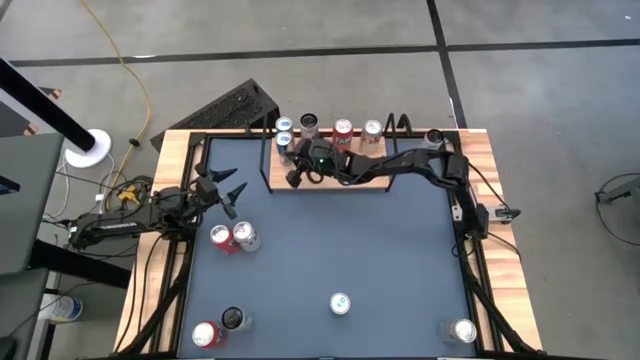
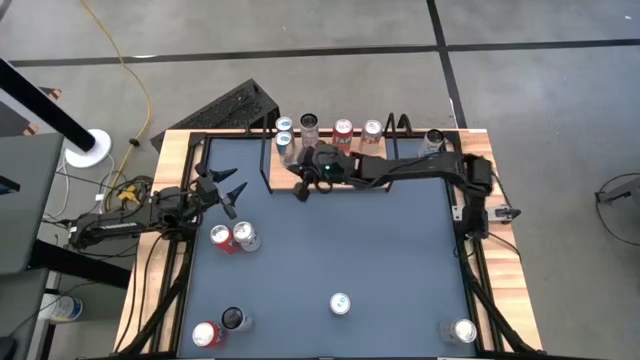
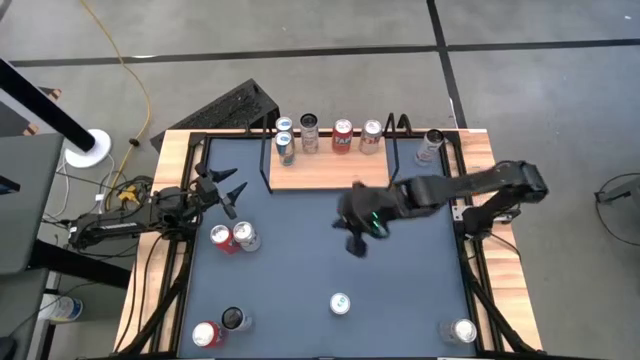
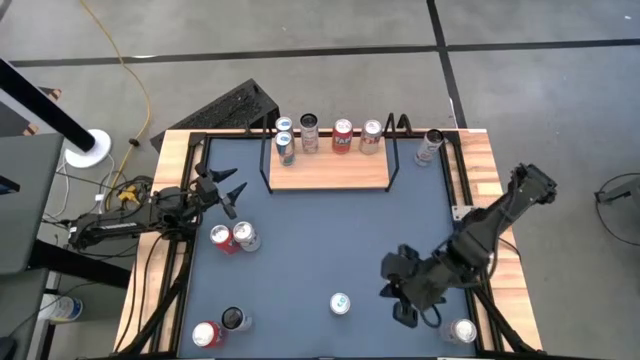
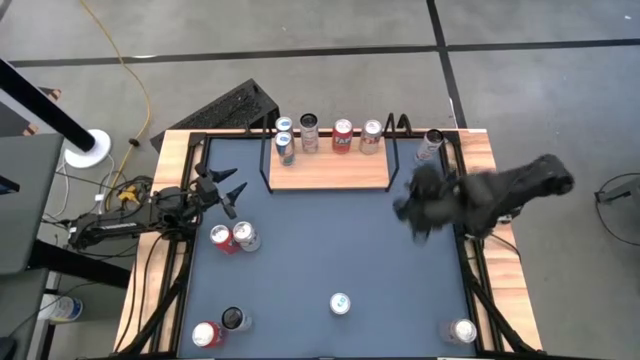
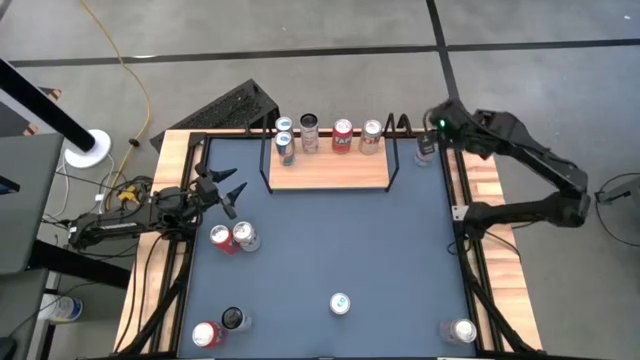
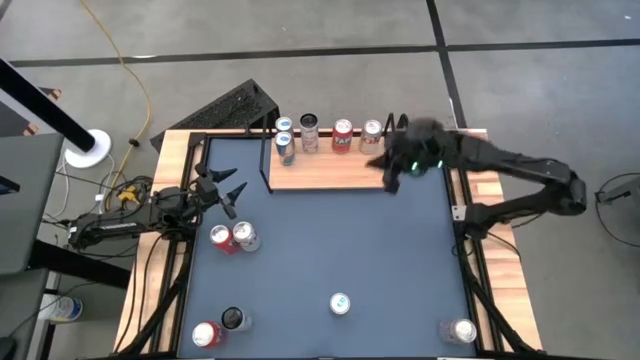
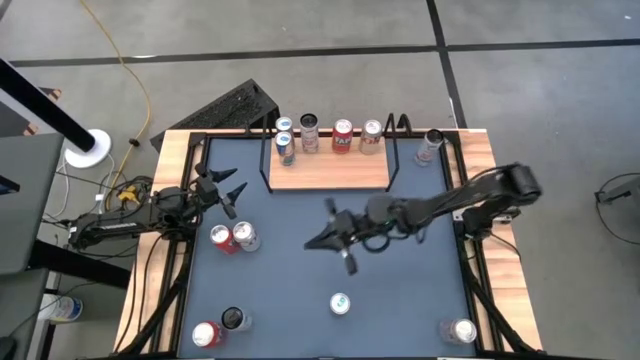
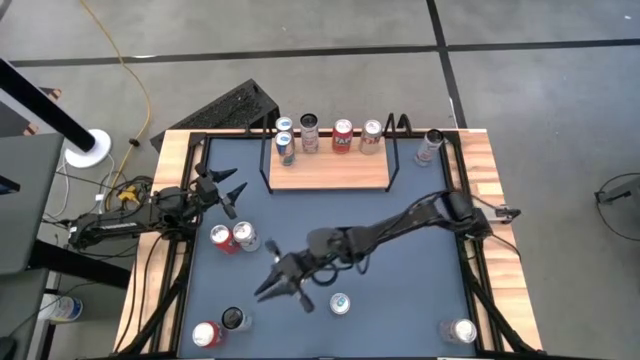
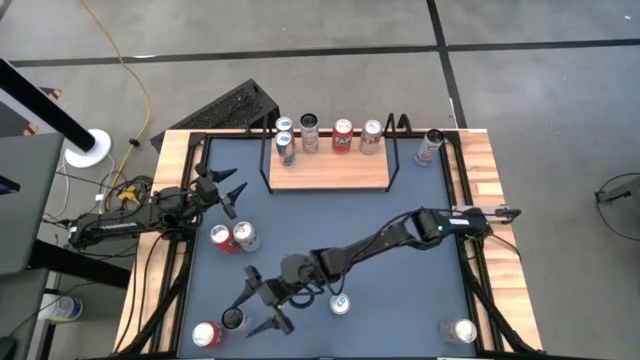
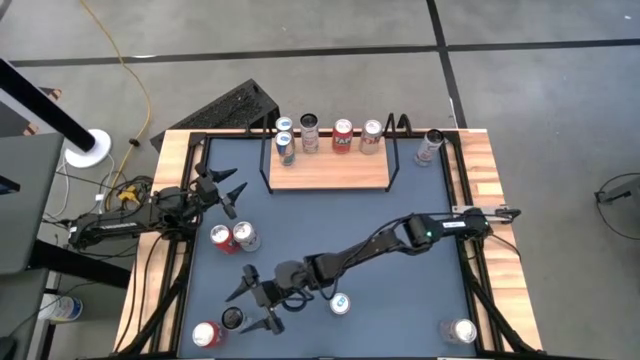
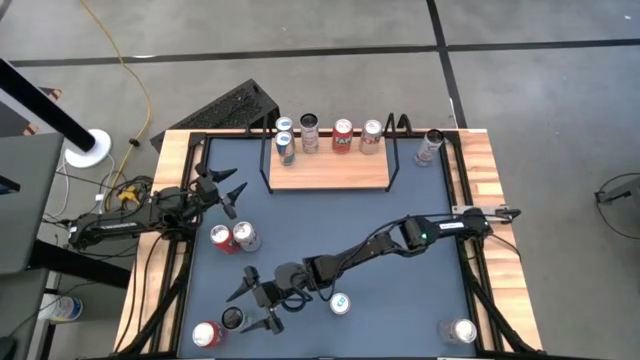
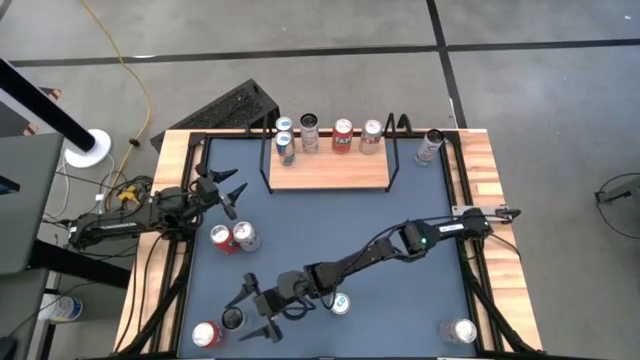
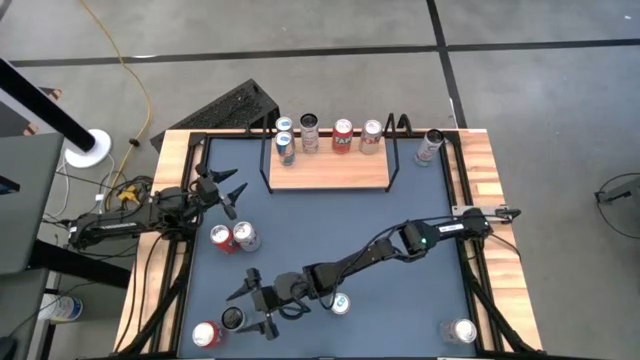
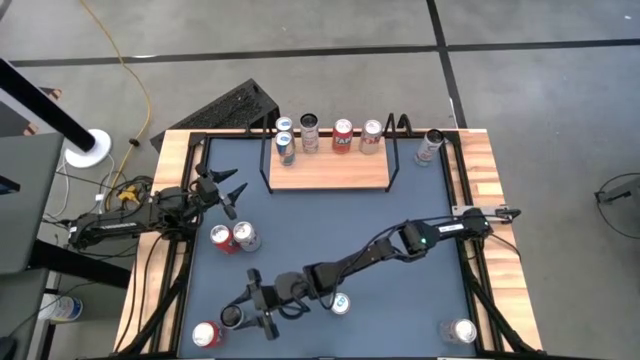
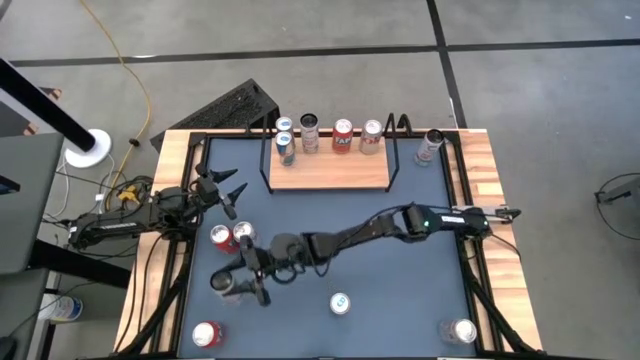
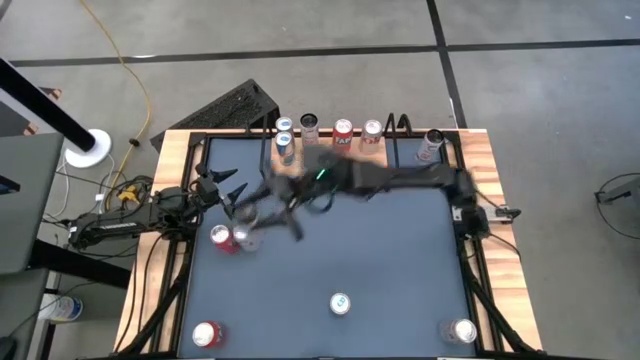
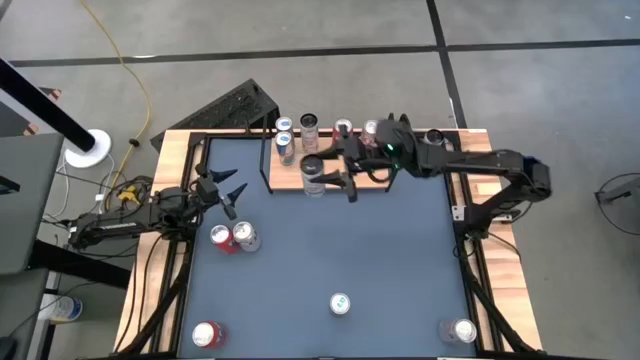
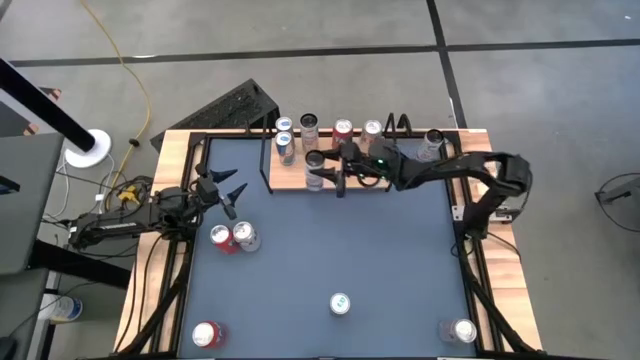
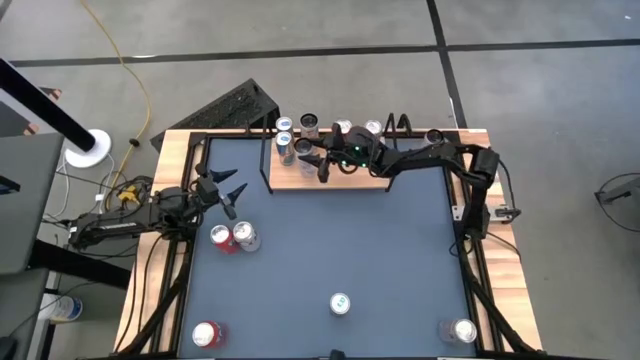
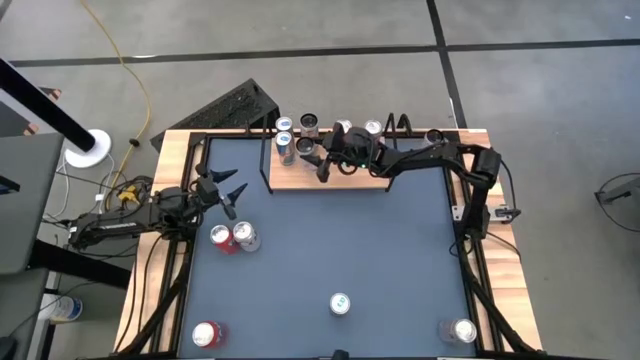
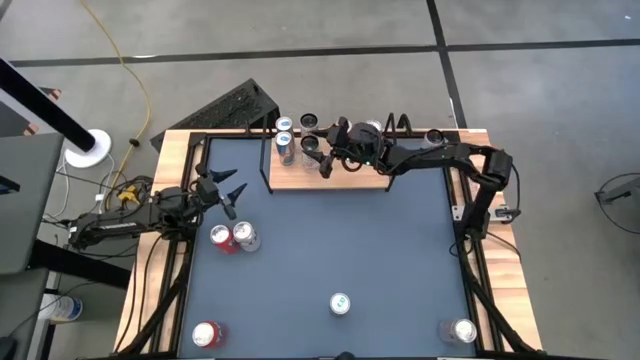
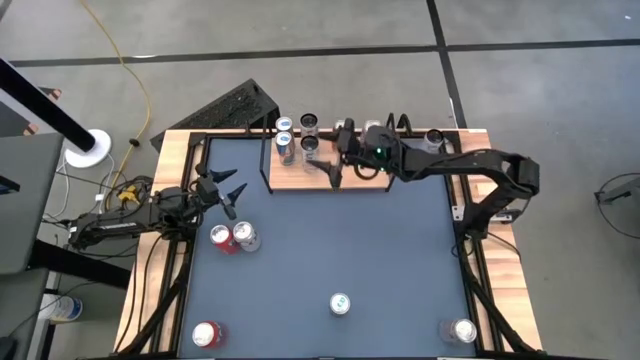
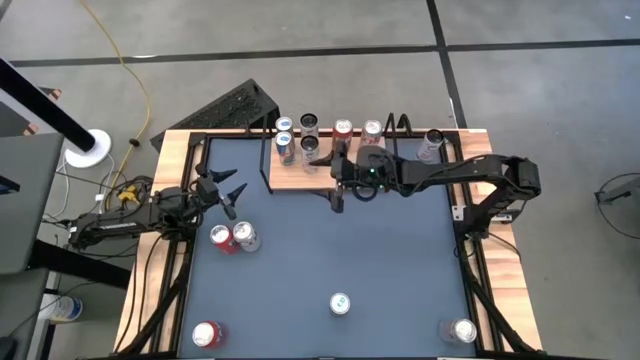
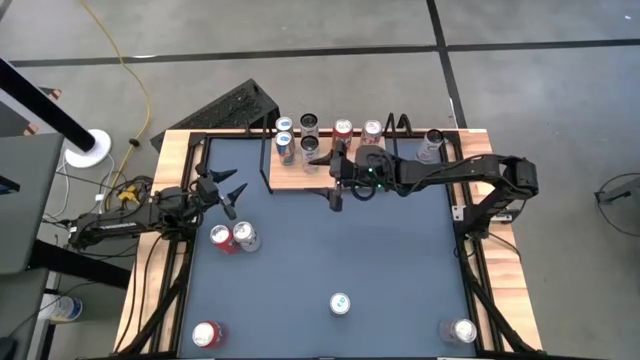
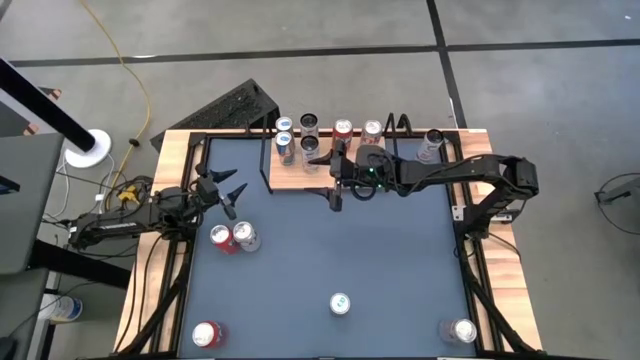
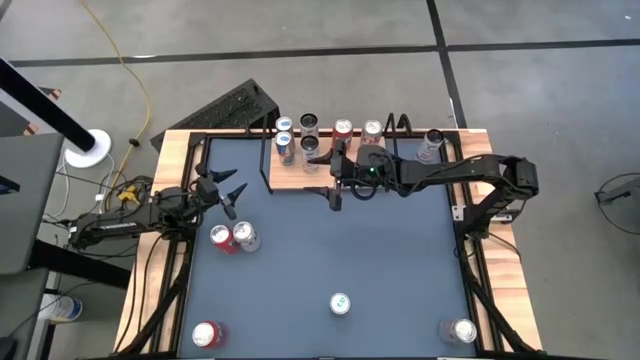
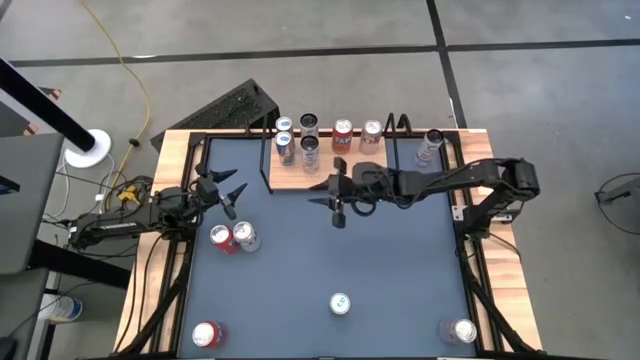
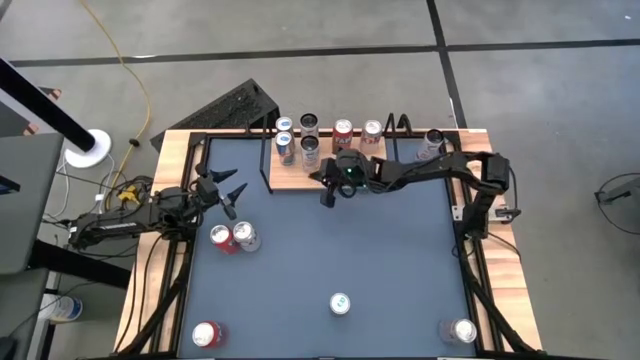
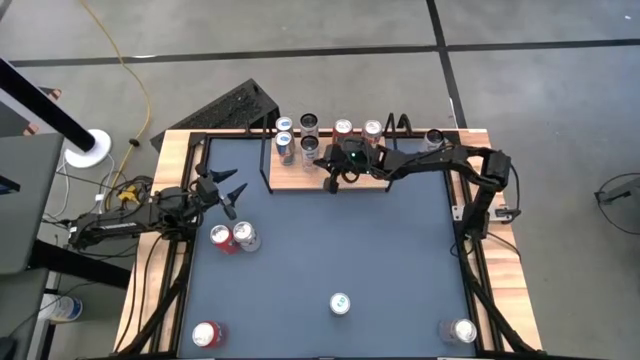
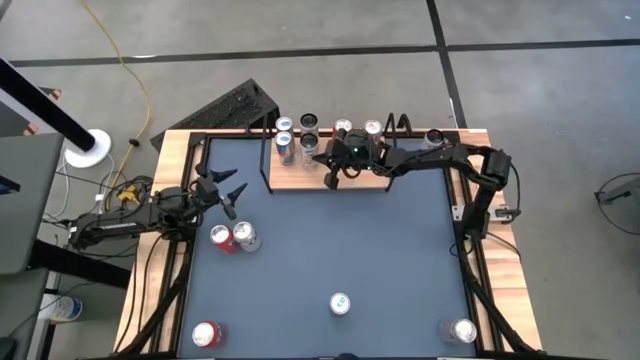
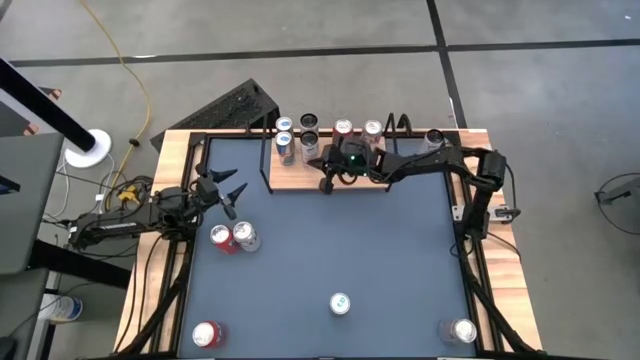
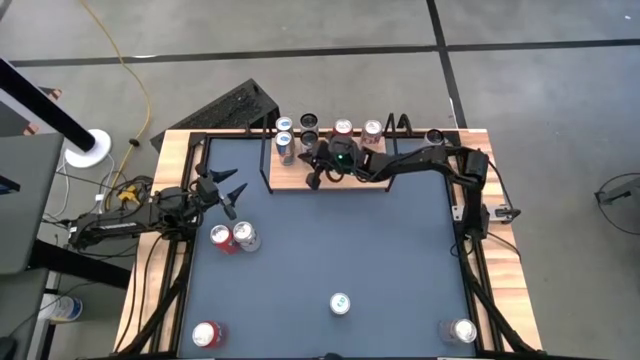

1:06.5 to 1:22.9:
Task: Place canned beverage on shelf
Put the bottom white-pink soda can on the shelf aligned with the other white-pink soda can

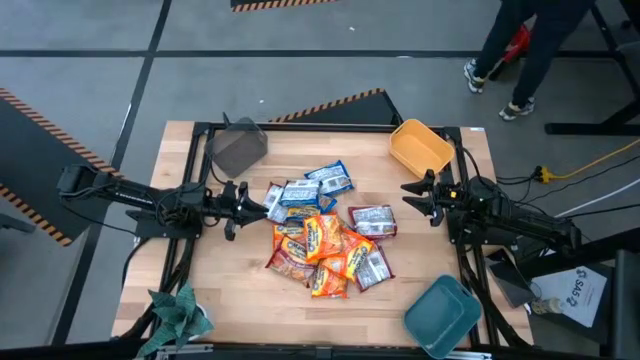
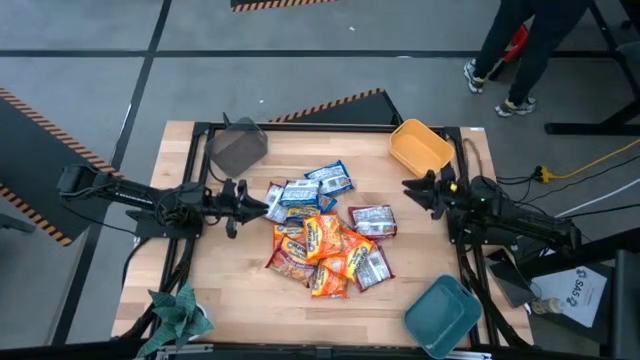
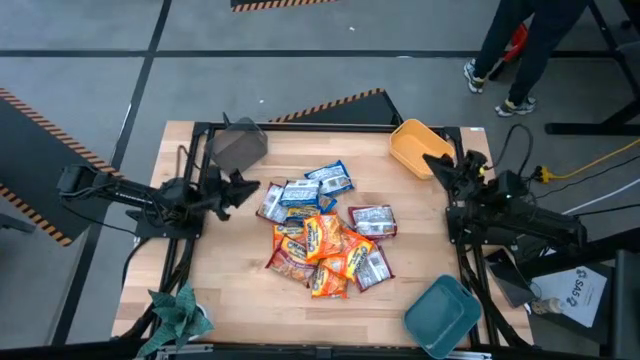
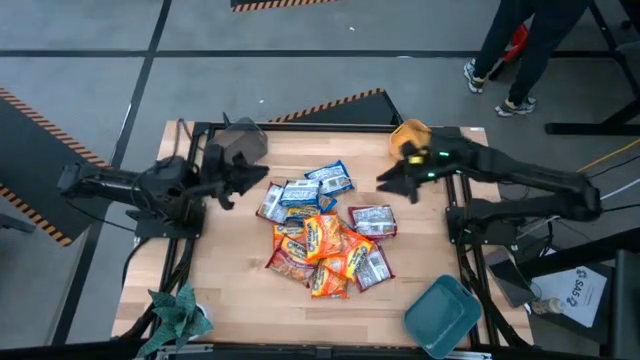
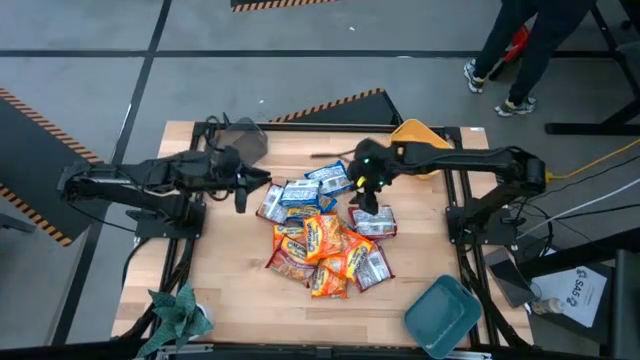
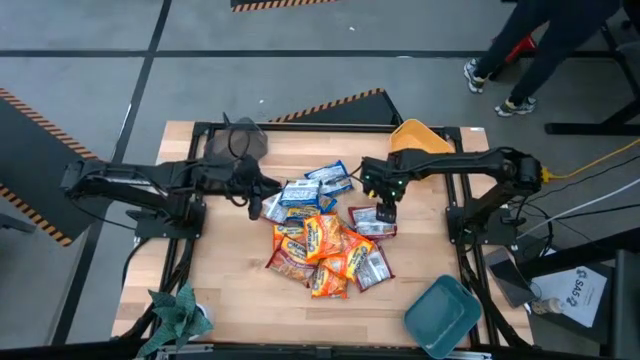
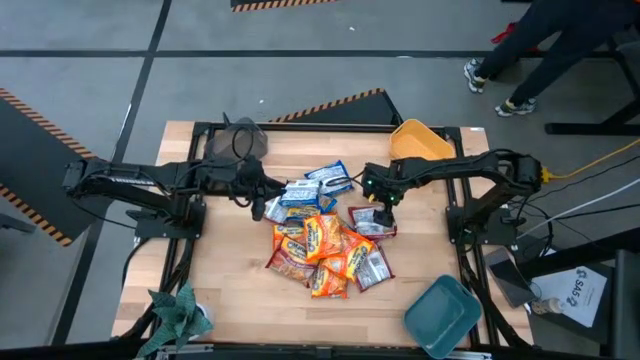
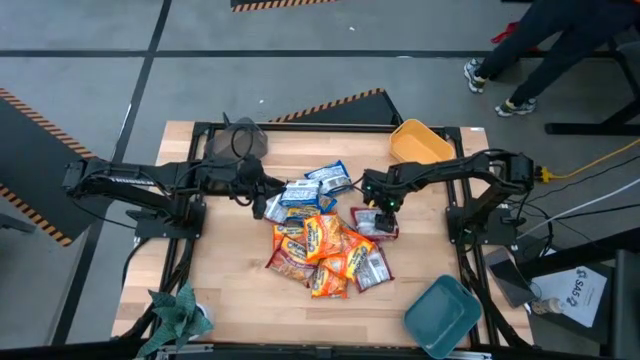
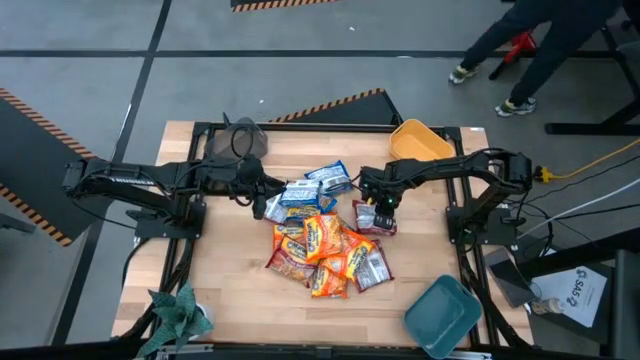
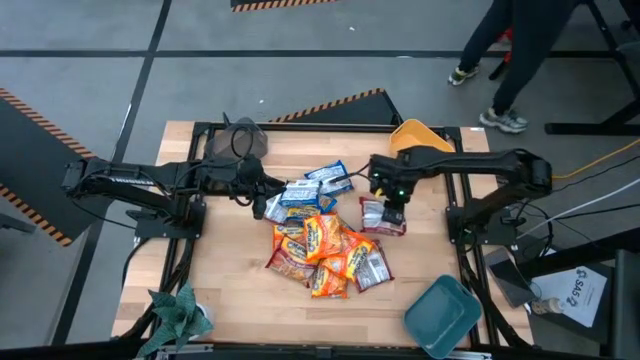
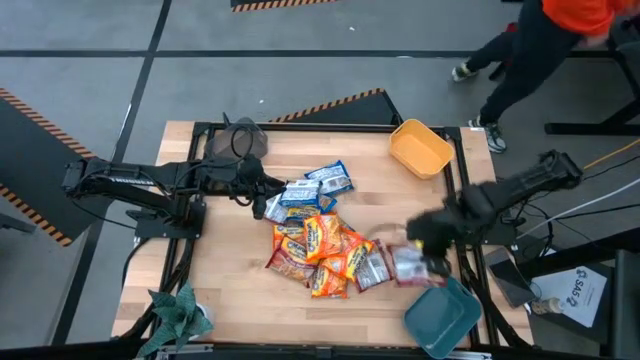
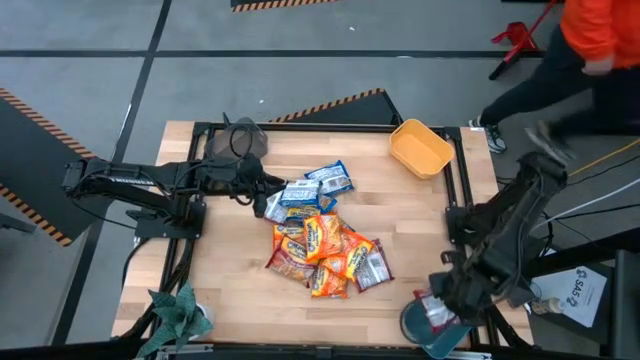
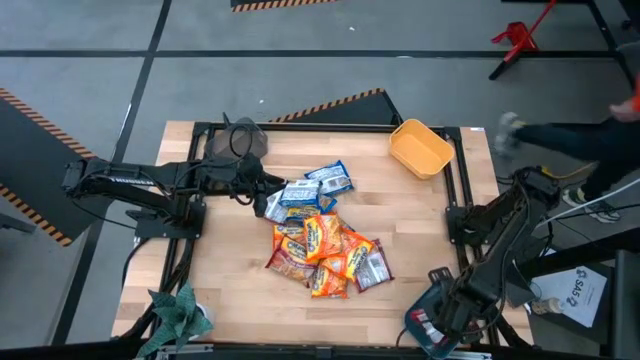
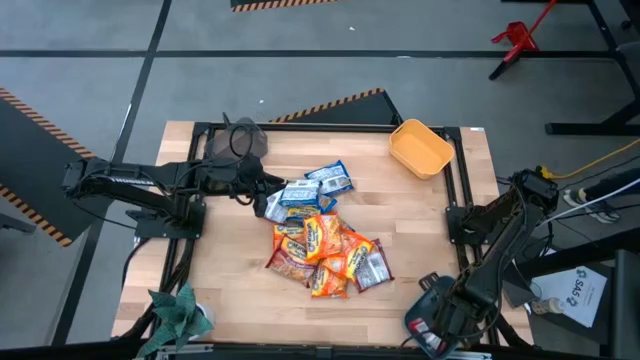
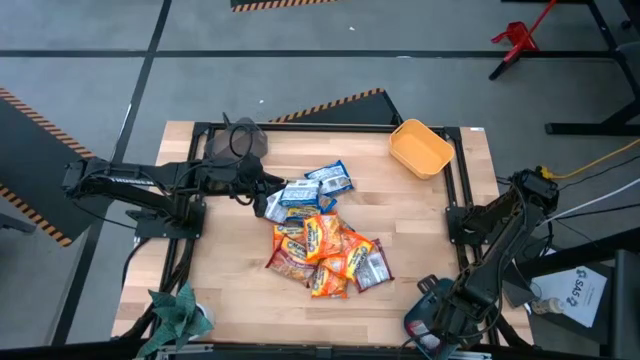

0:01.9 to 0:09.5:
Task: Sort Maruchan noodles
Put the red noodle pack into the blue bin
